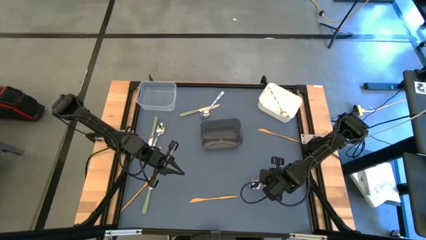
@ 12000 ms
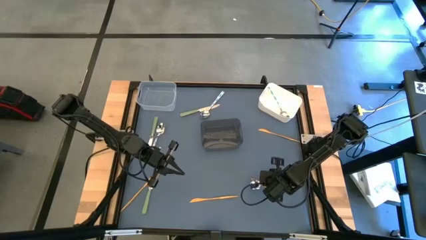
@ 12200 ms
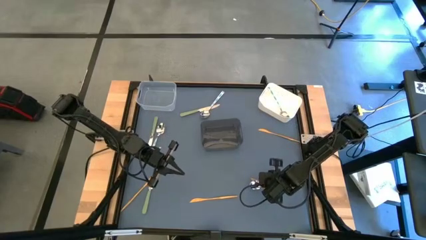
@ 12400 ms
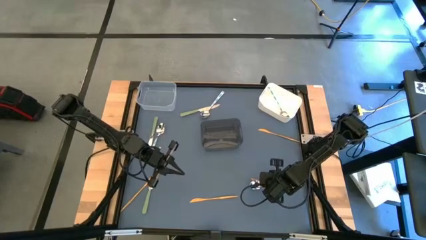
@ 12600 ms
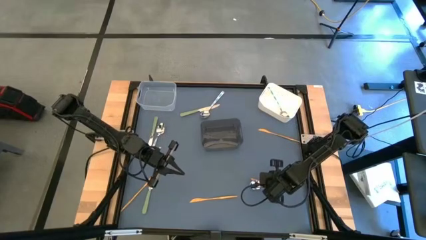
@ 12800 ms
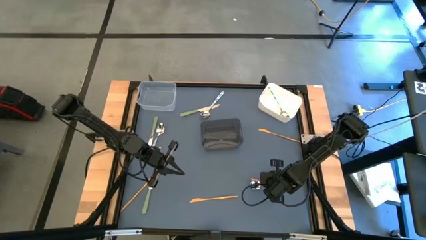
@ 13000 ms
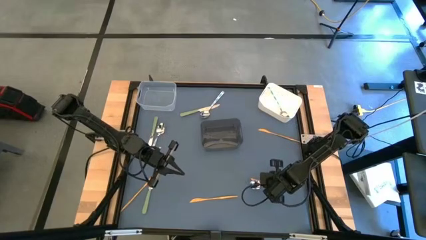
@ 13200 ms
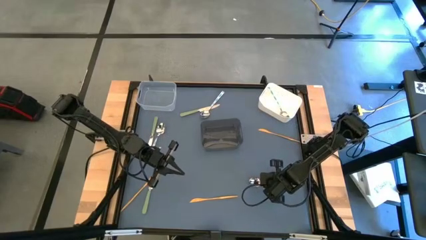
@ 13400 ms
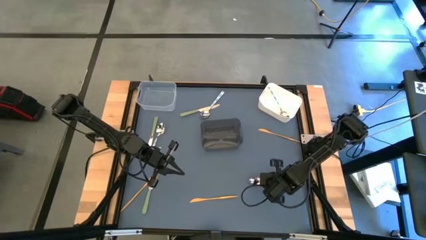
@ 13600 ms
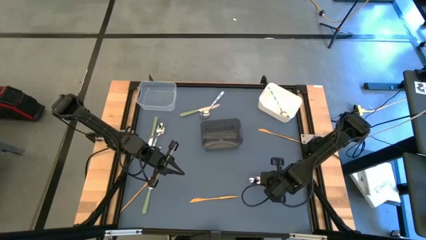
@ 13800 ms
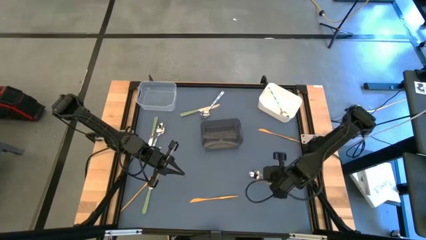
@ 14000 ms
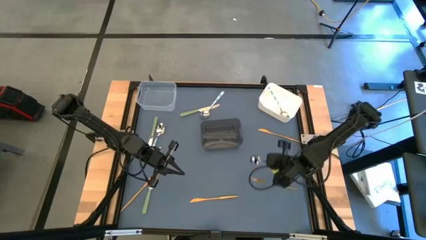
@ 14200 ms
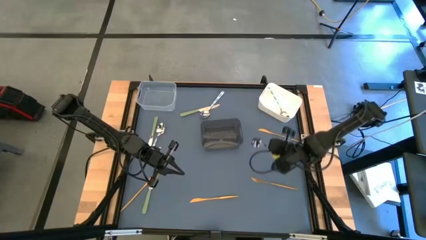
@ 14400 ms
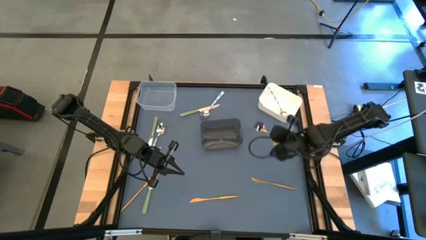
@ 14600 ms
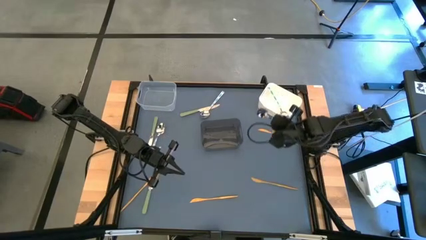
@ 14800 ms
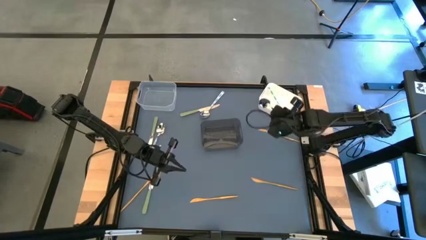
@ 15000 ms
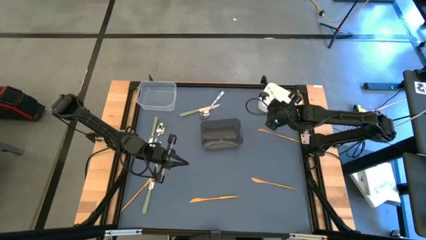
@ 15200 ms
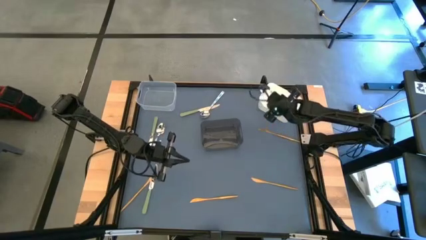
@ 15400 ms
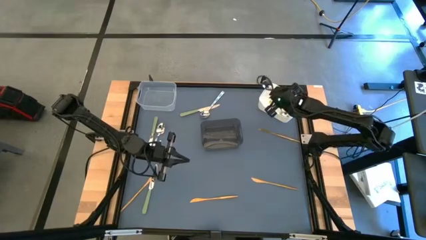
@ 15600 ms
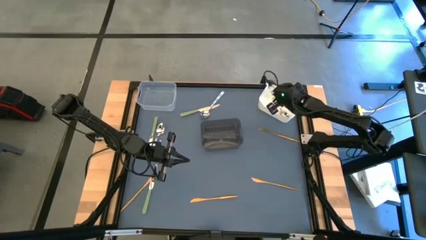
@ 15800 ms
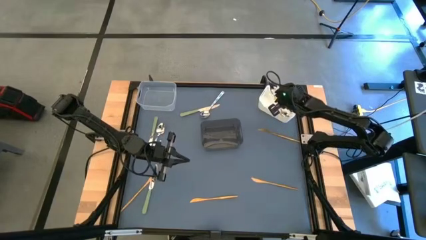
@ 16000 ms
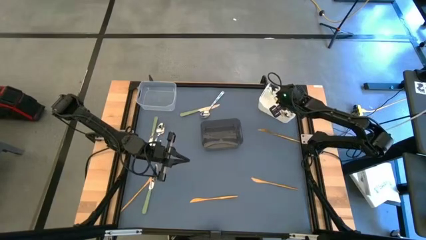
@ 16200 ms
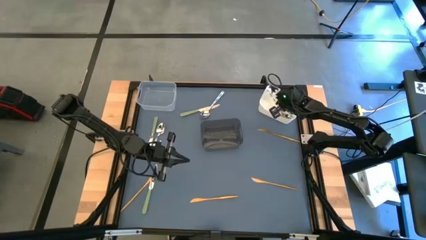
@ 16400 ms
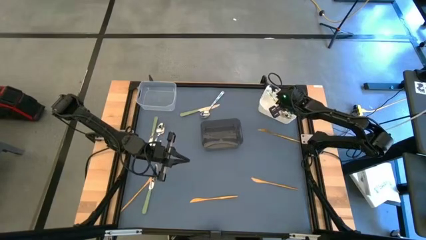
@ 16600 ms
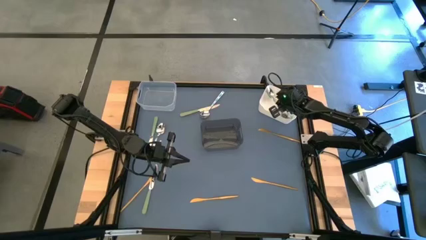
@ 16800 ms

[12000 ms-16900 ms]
Task: Sort silverware by color (type)
Put the green spoon into the white bin

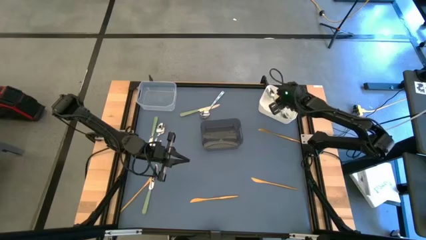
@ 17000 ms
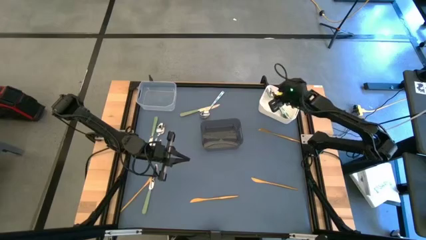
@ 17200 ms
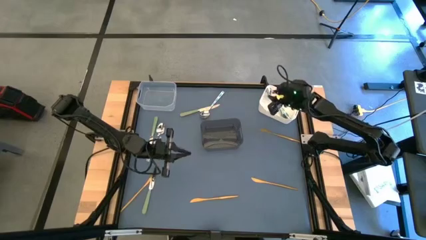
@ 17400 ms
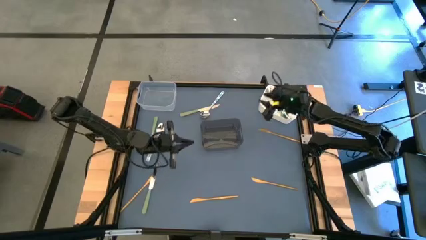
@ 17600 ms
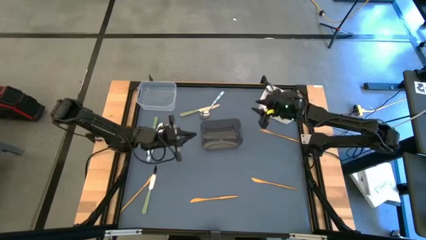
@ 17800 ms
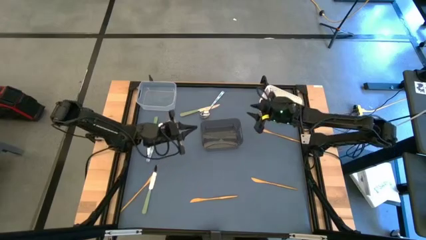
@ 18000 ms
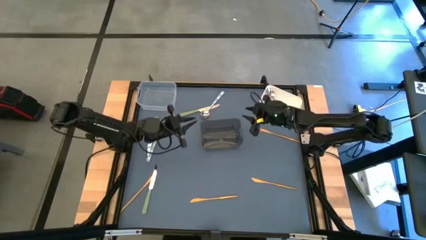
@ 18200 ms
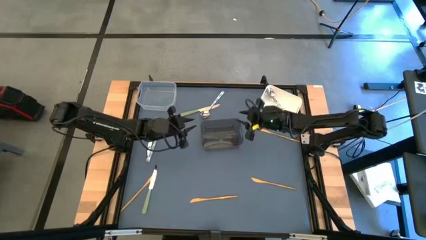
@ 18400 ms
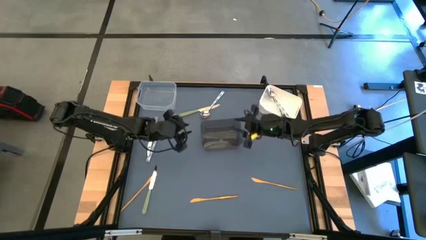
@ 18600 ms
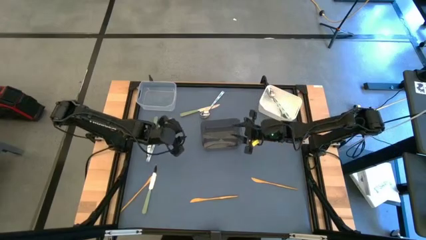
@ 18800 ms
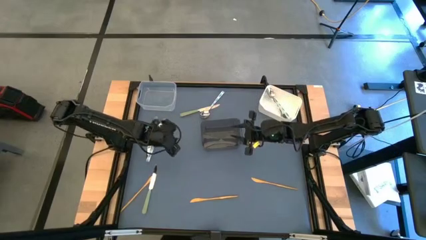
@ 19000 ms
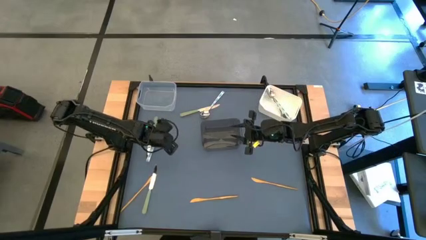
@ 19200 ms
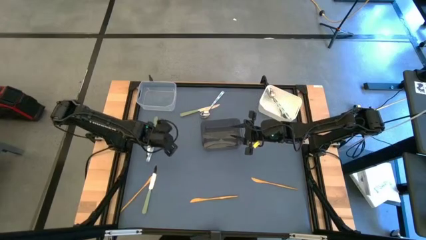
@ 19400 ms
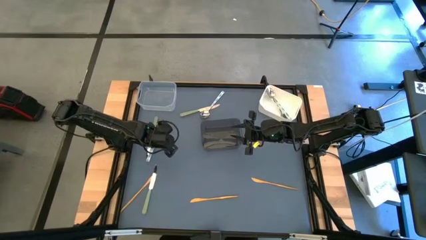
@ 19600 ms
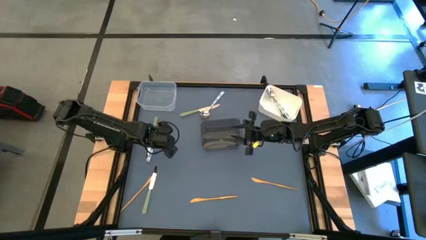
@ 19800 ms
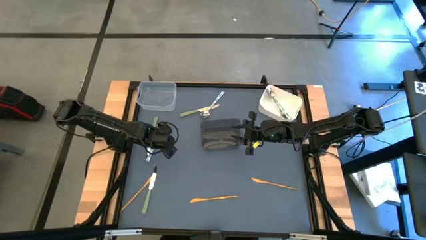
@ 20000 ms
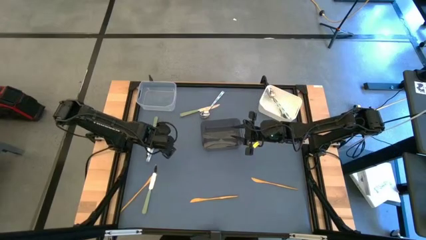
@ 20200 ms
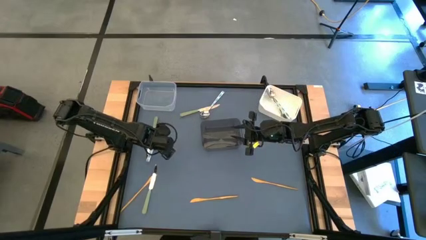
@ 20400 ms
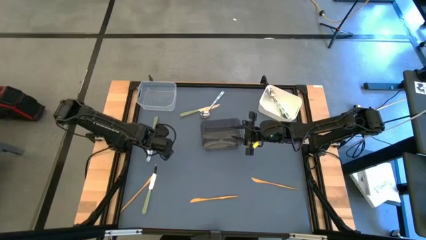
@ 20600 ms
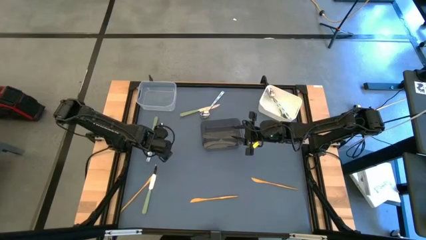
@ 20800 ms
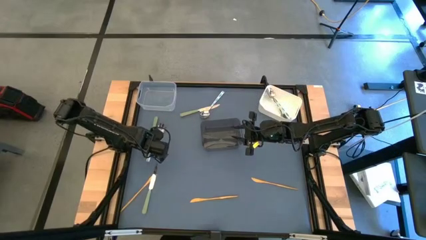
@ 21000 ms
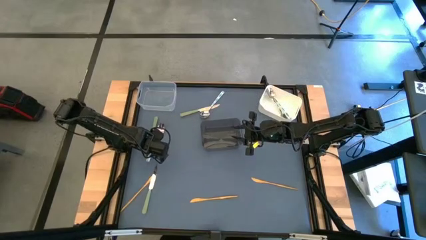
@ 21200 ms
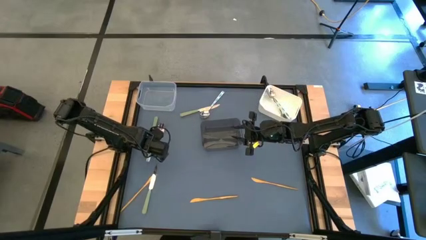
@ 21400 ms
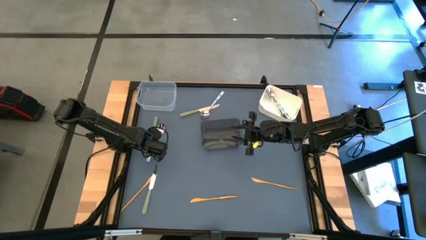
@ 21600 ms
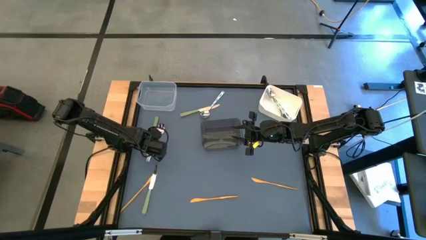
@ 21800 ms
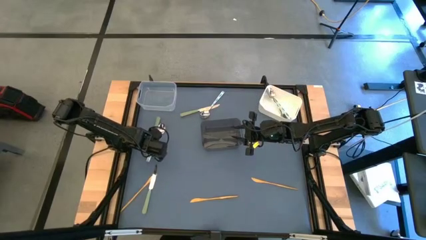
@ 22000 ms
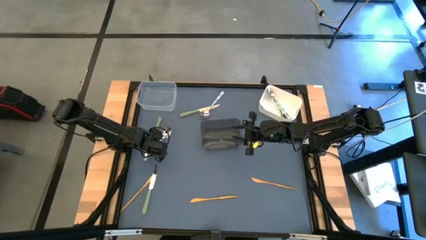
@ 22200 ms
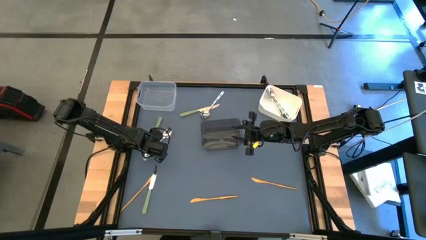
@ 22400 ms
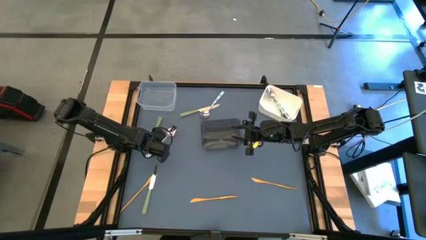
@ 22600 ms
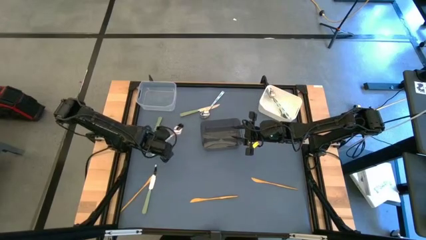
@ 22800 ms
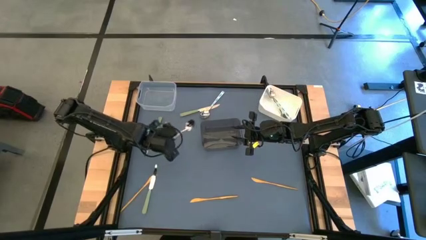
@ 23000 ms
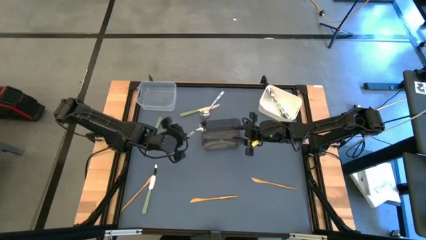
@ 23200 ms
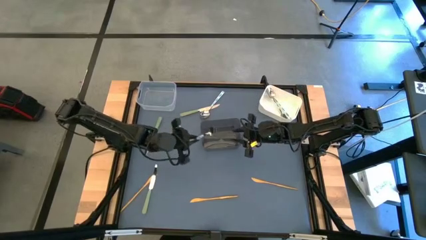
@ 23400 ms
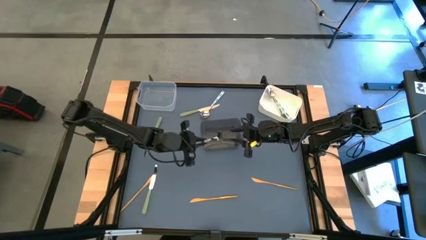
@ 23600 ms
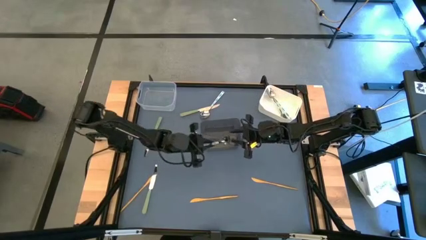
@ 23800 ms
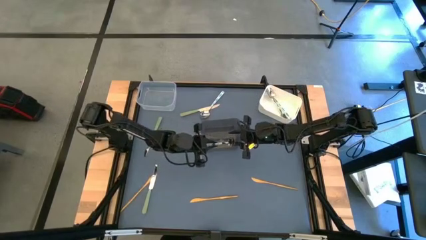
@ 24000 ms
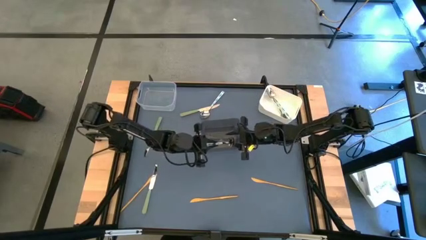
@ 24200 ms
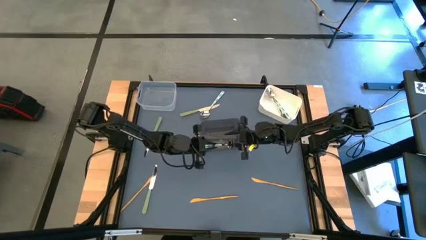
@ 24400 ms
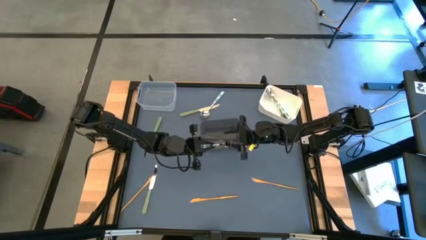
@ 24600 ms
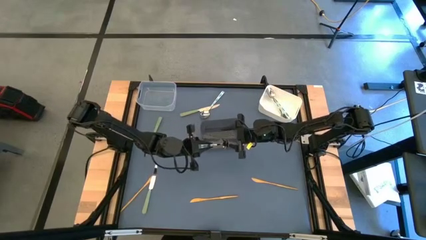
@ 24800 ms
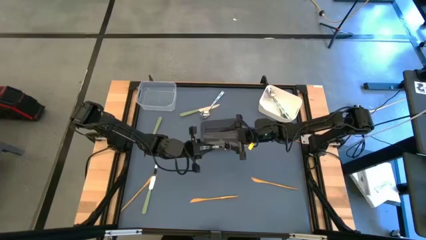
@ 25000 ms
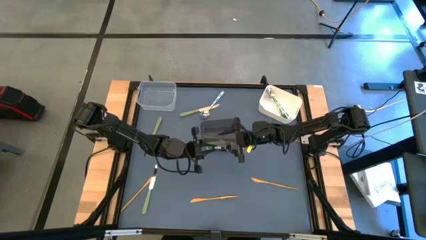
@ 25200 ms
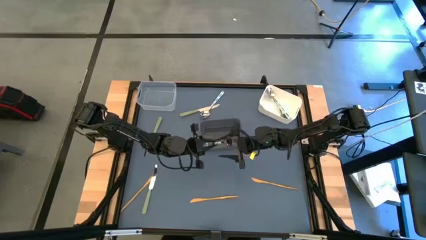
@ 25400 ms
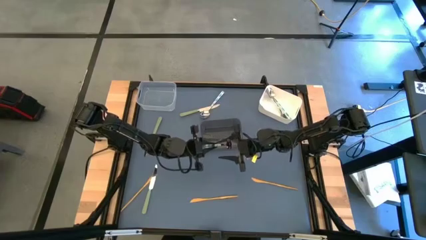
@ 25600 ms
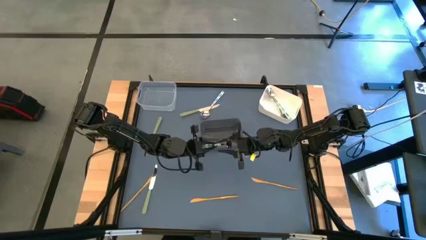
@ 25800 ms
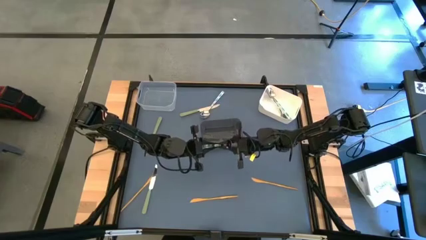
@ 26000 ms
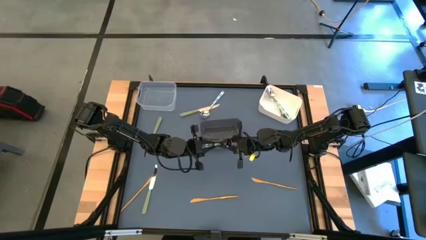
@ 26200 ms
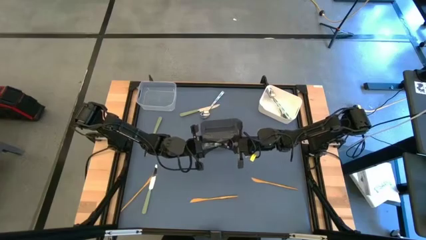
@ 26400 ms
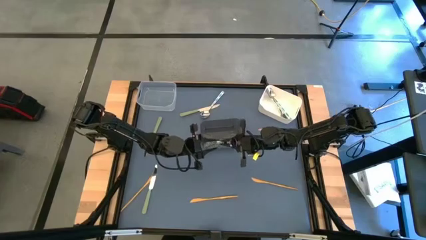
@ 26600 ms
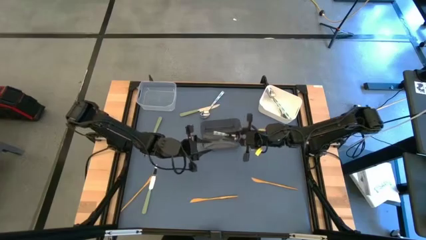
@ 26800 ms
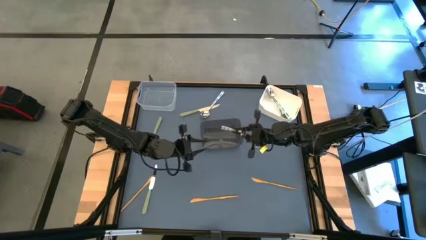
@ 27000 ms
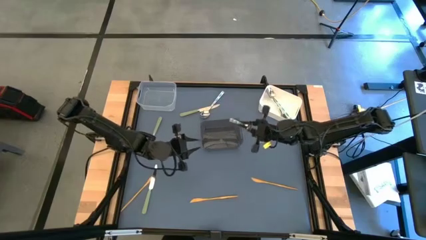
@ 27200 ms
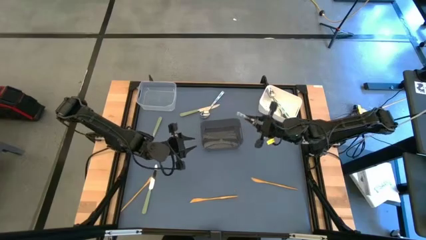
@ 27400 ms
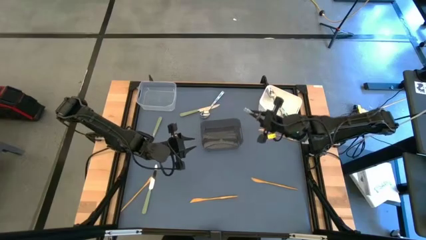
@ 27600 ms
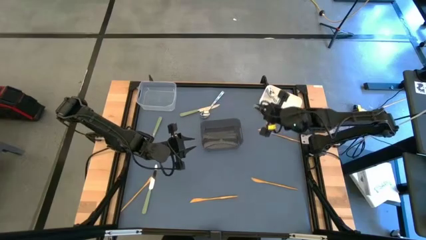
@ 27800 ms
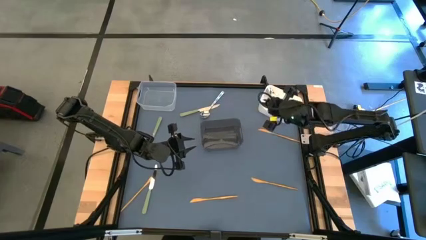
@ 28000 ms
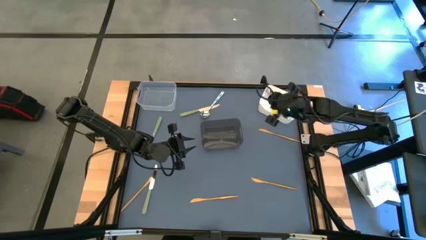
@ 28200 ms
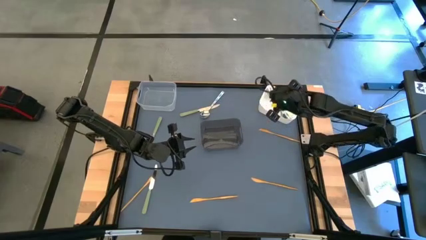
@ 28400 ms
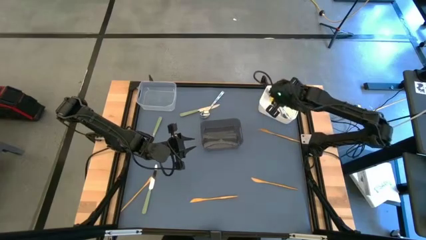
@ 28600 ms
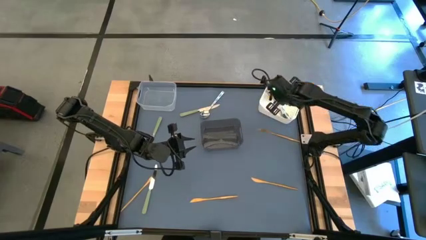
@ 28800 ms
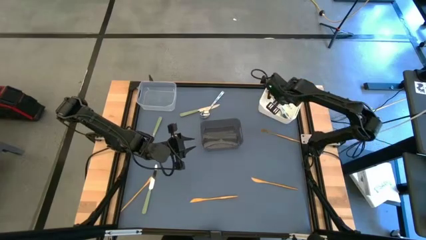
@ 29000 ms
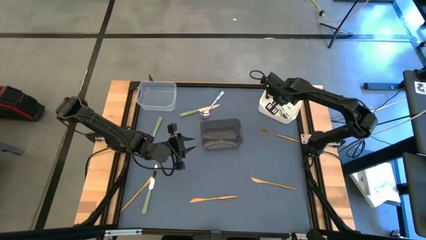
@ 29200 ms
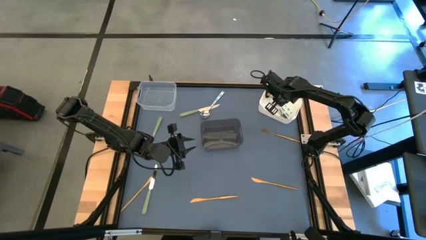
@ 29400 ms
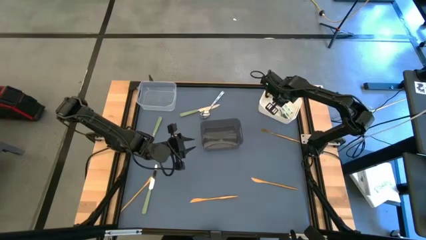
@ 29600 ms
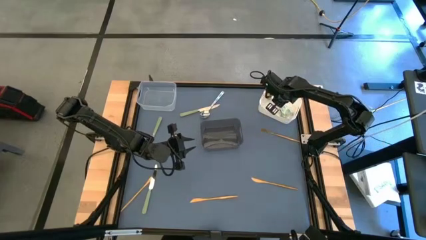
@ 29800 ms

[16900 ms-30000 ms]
Put the green spoon into the white bin
